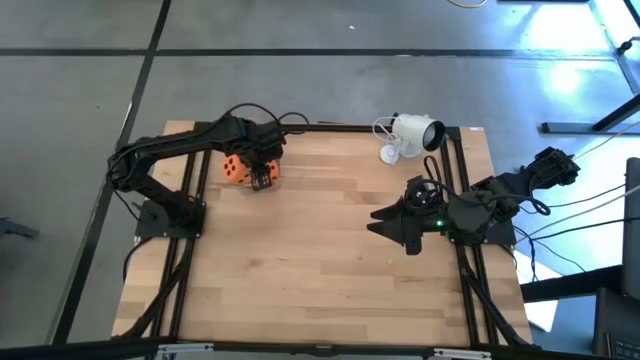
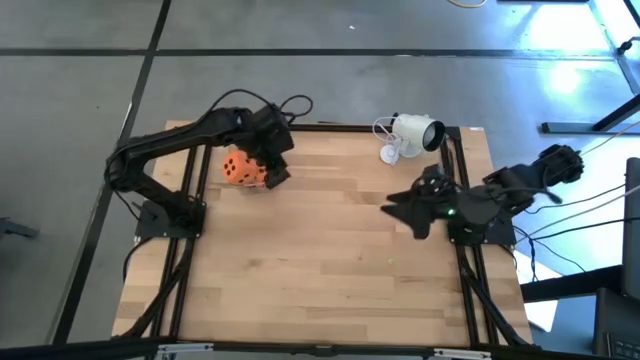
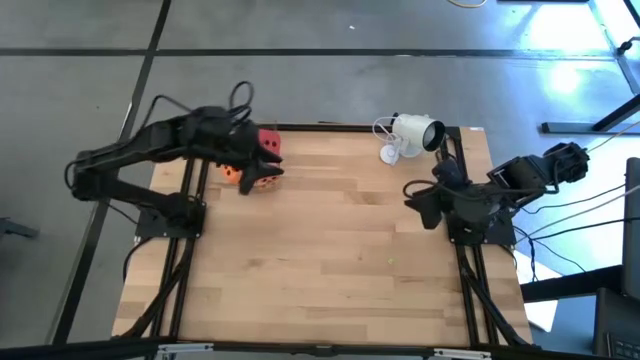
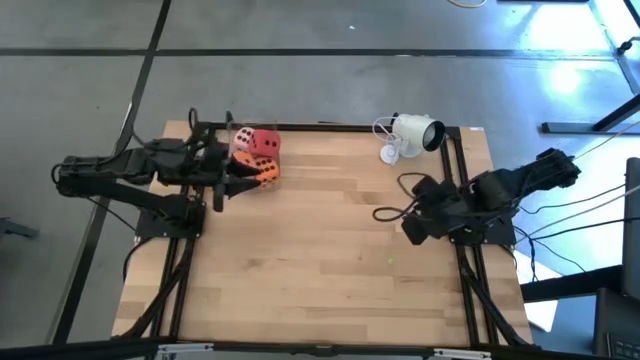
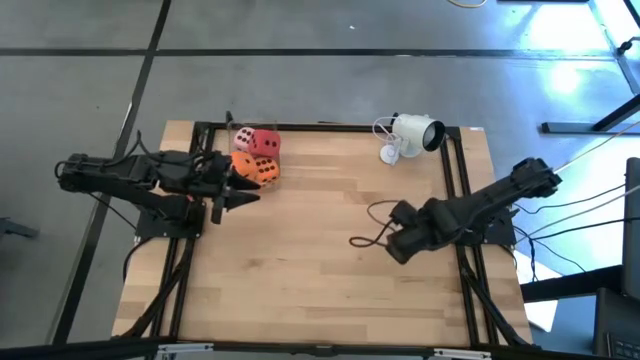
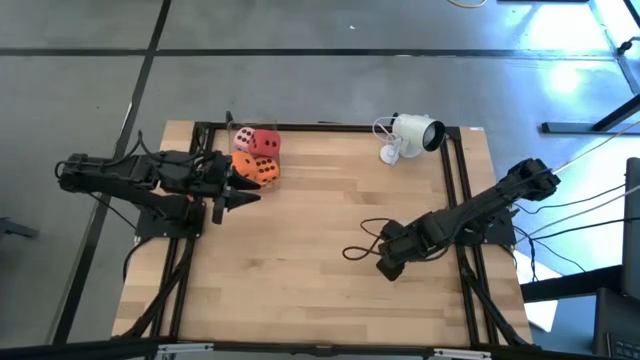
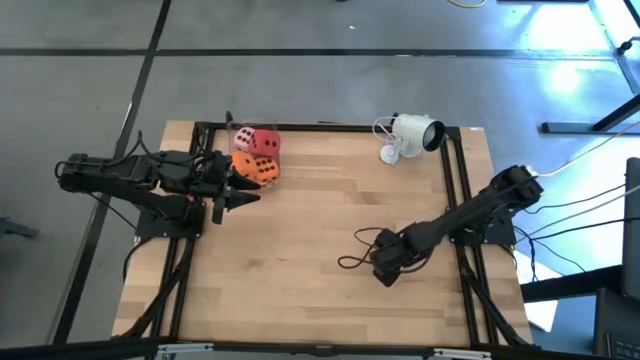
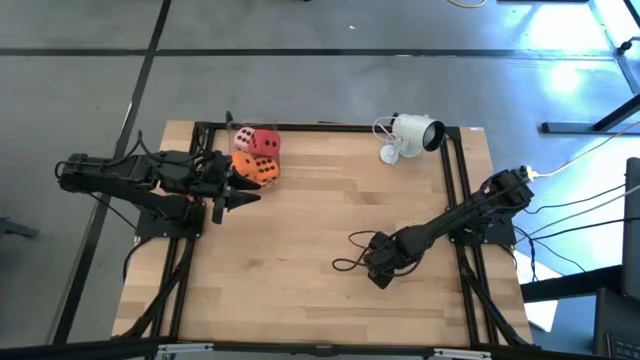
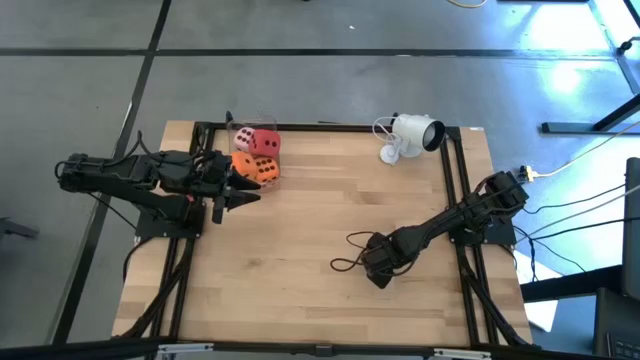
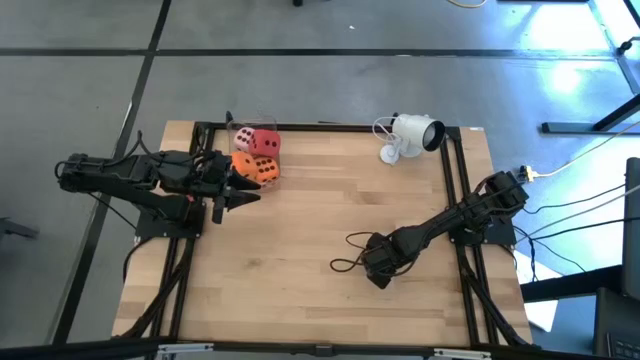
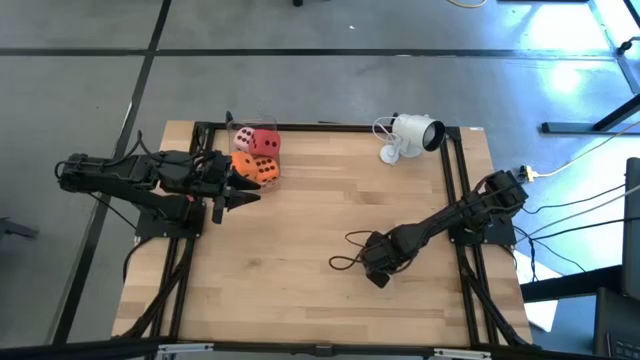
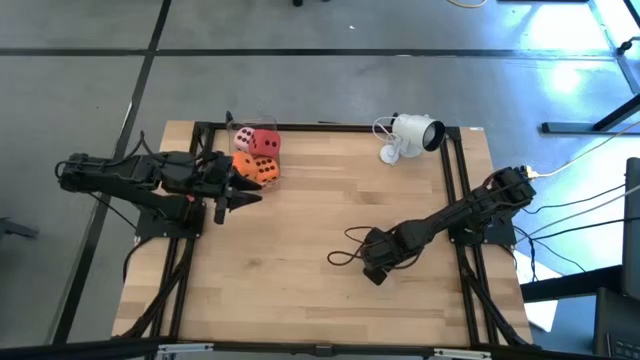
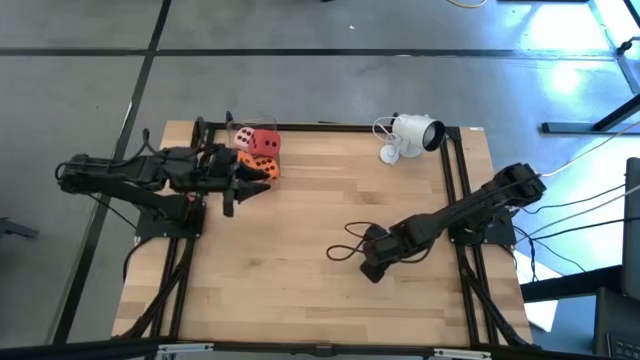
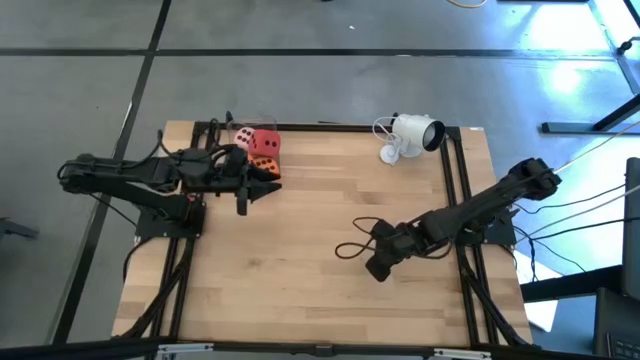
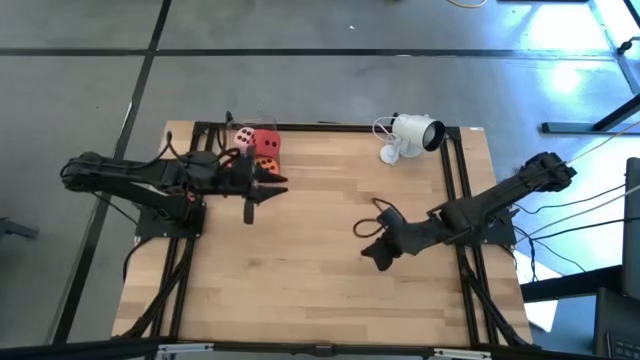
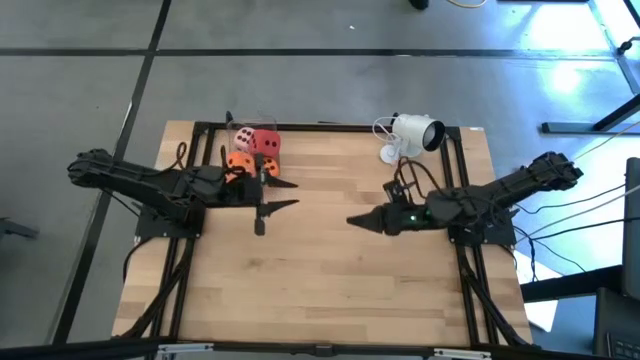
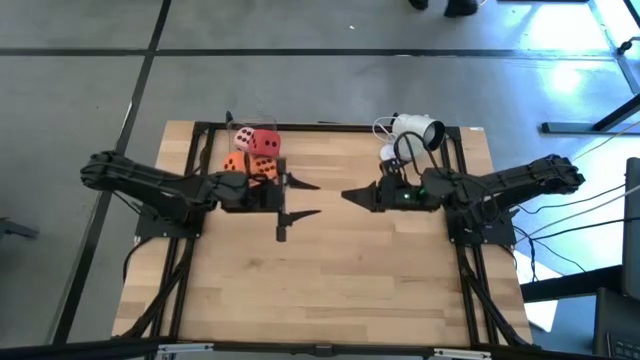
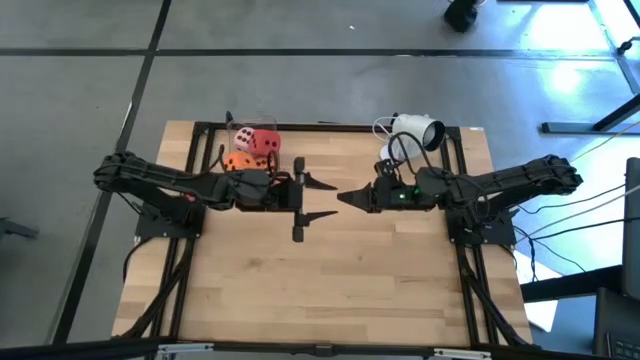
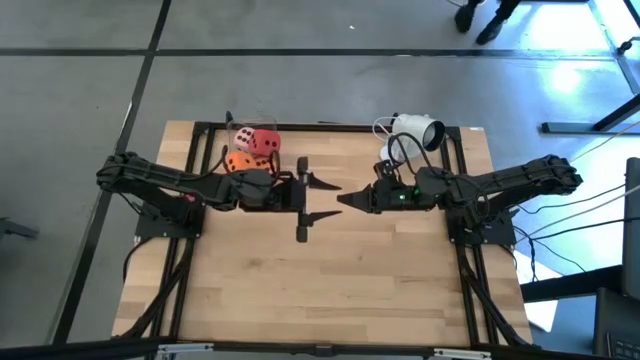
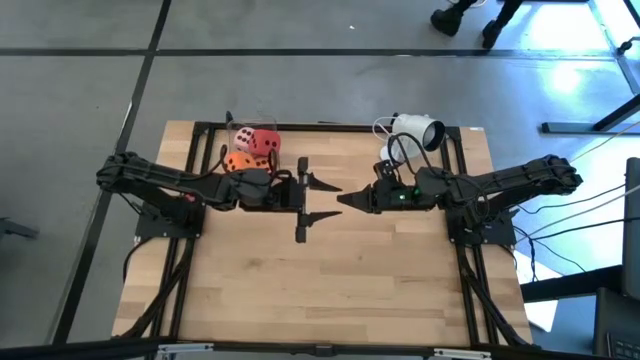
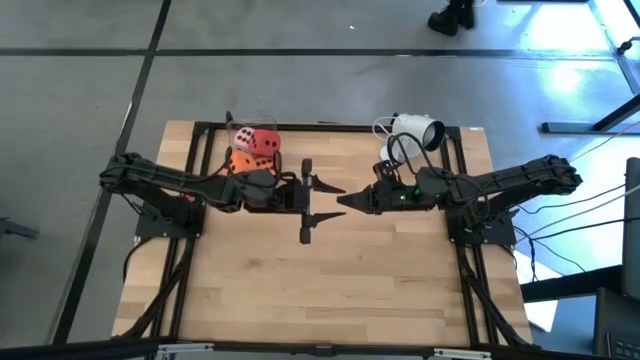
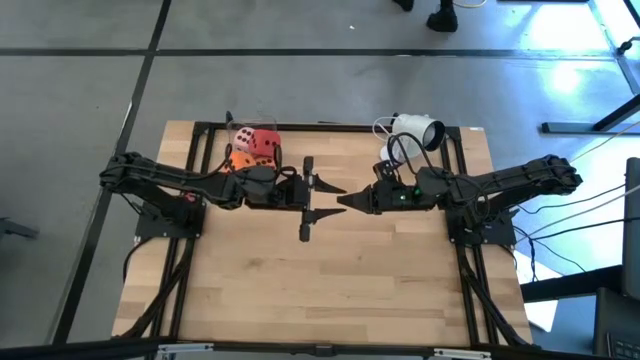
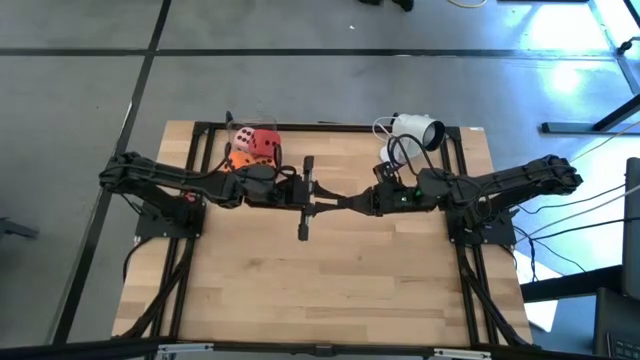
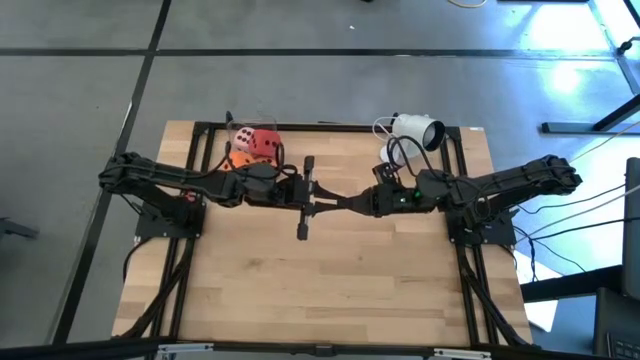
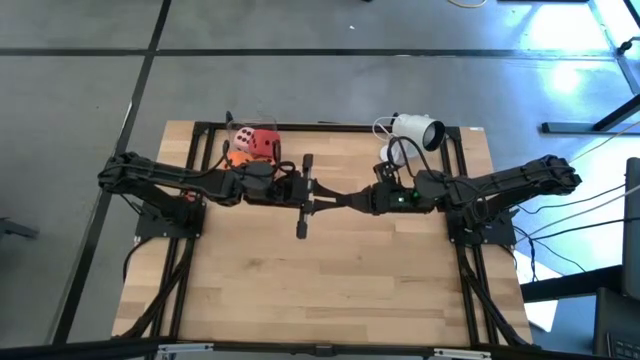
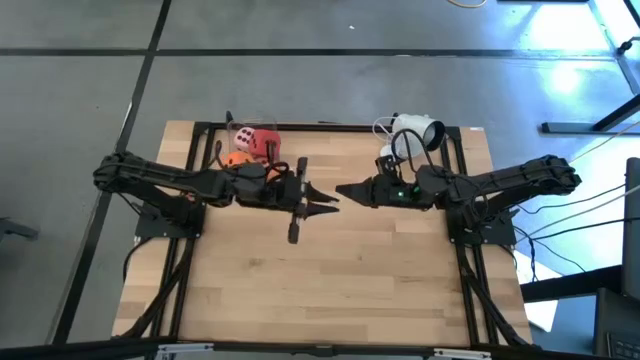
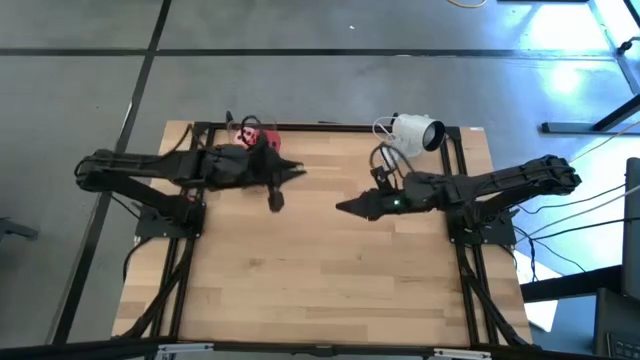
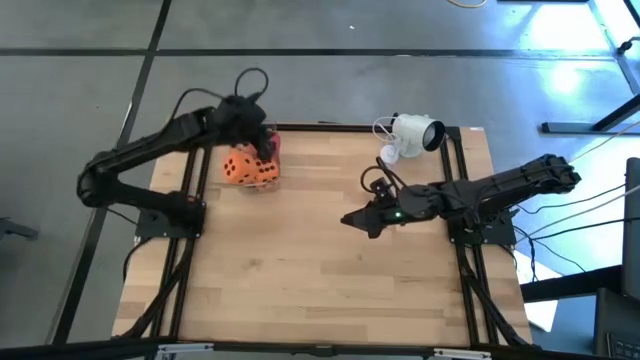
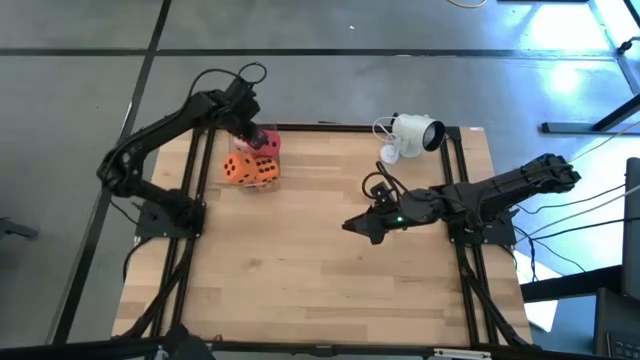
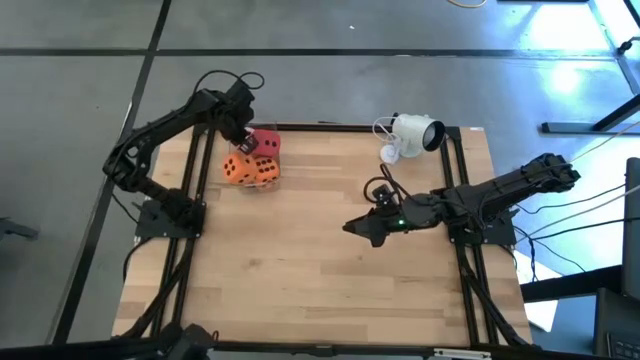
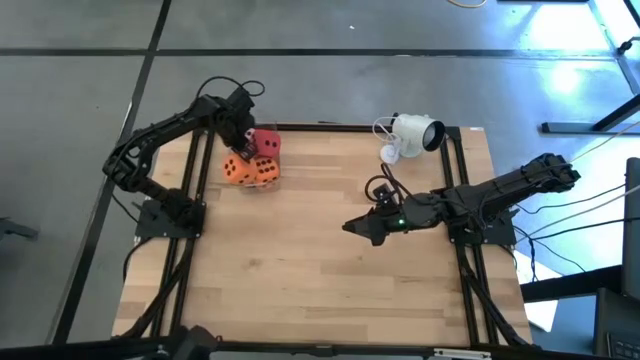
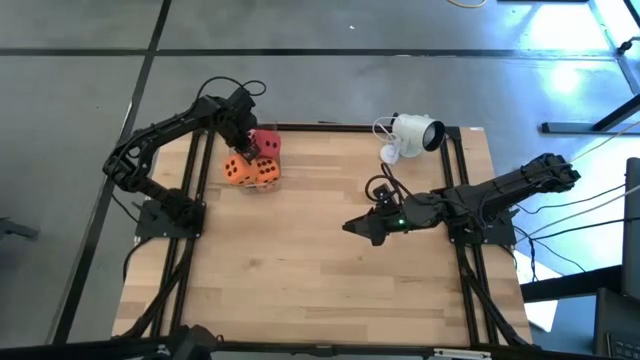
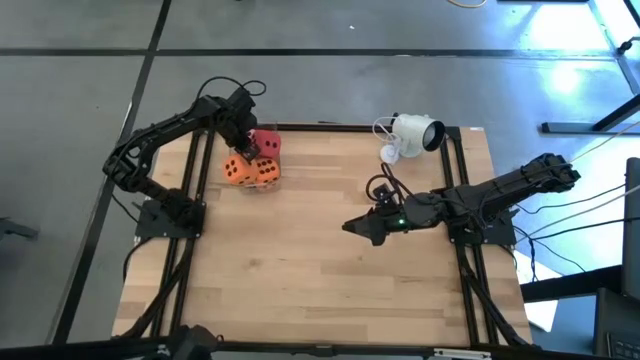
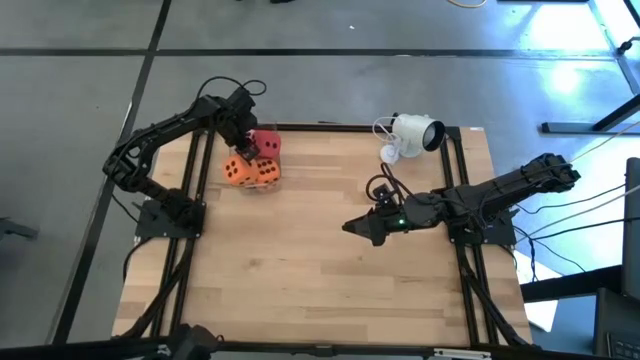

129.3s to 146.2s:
Task: Pick & Place Dice
Put the small green dice into the transparent bin

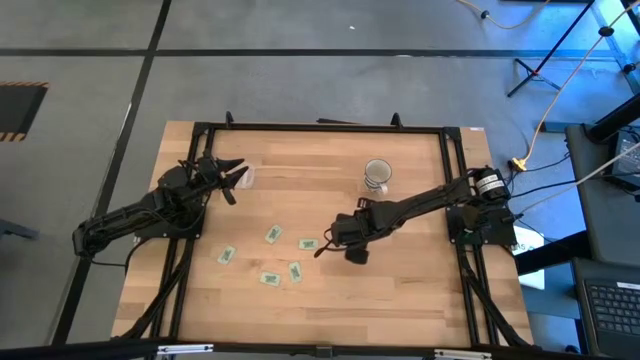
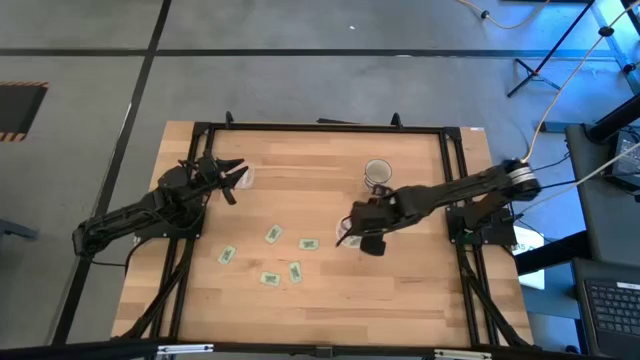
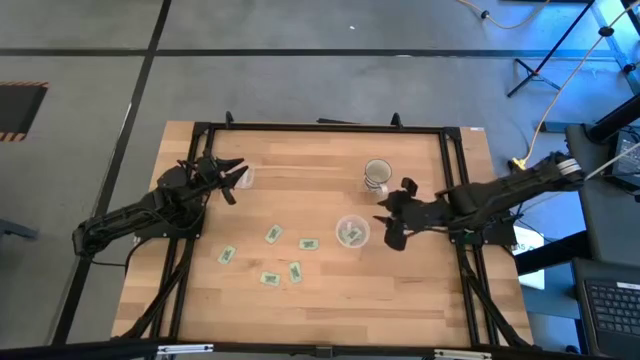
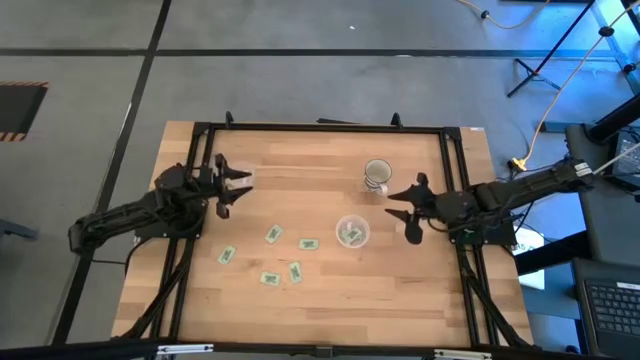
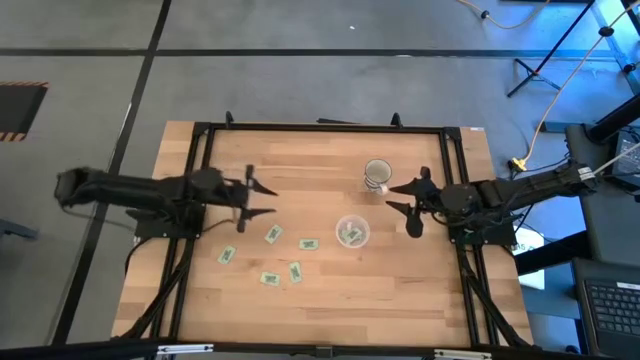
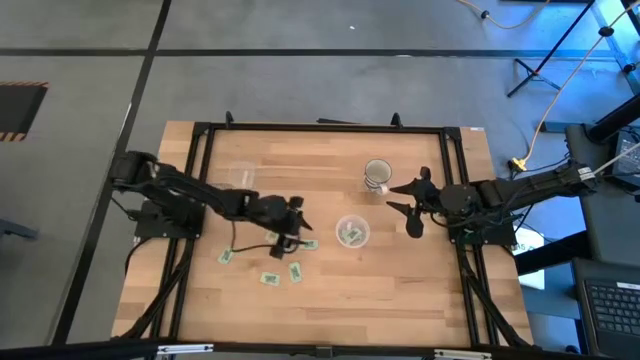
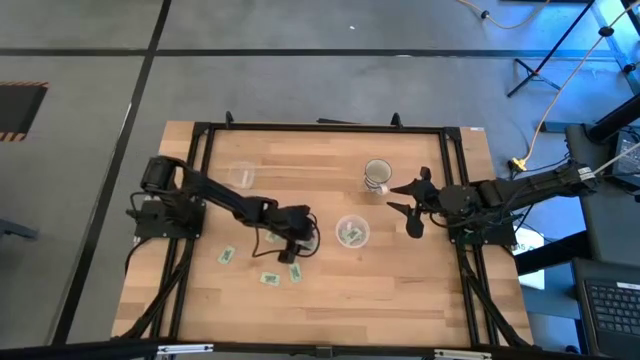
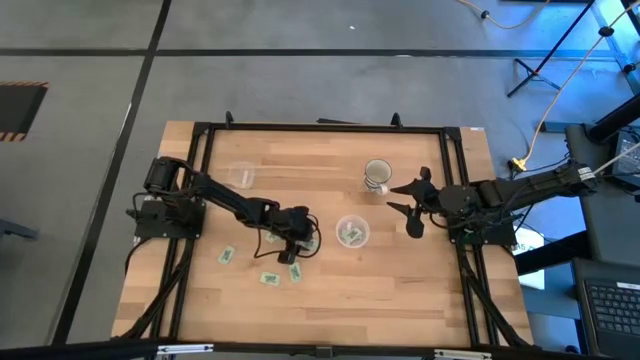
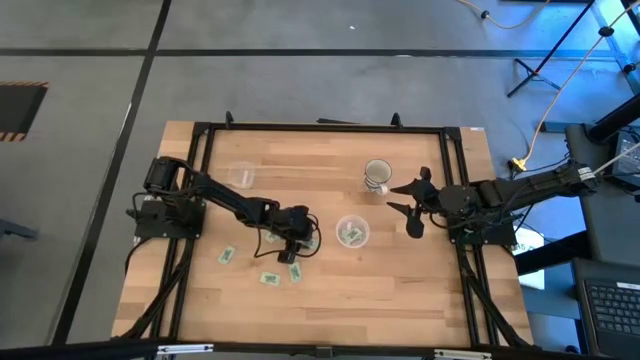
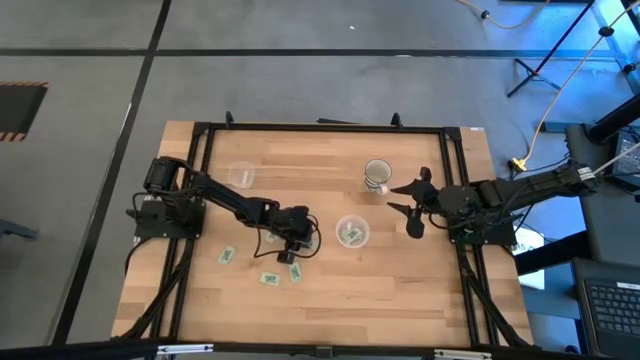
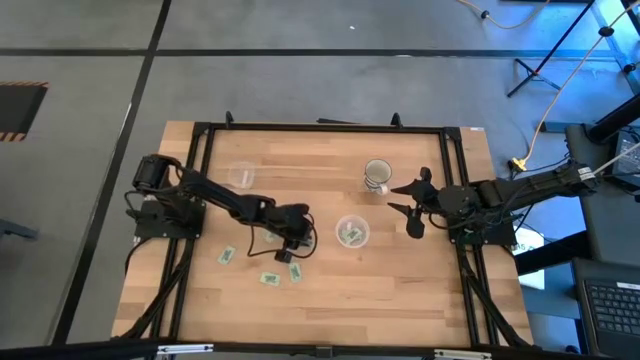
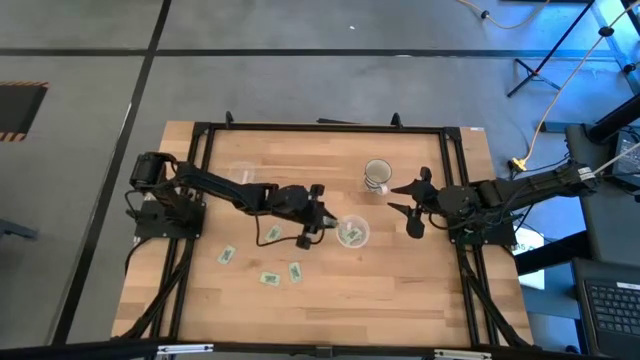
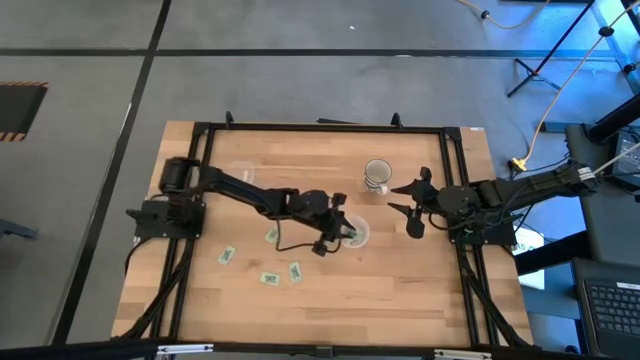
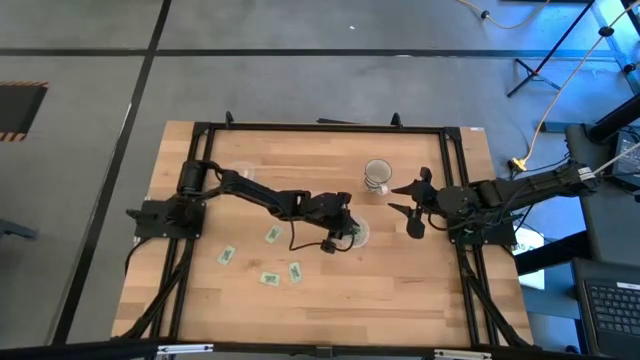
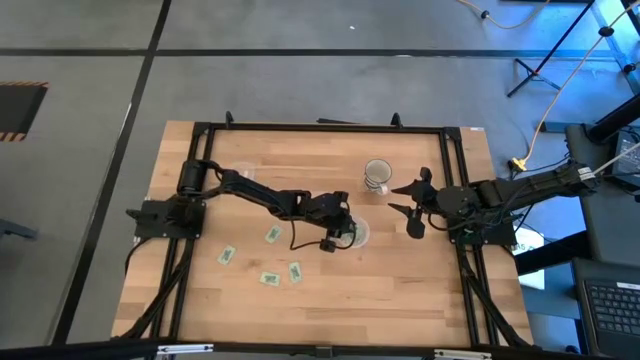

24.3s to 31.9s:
Task: Pick and place Stevia / Truvia into bins
Put the green stevia packet into the circular transparent container
